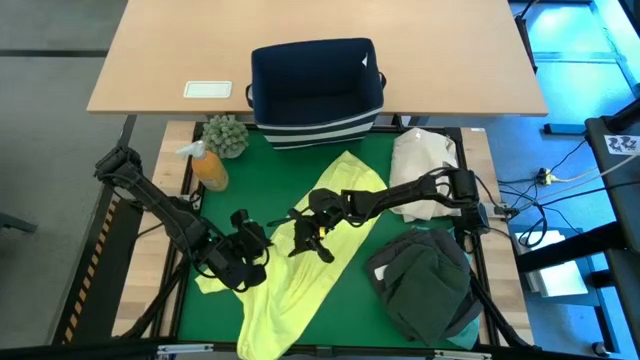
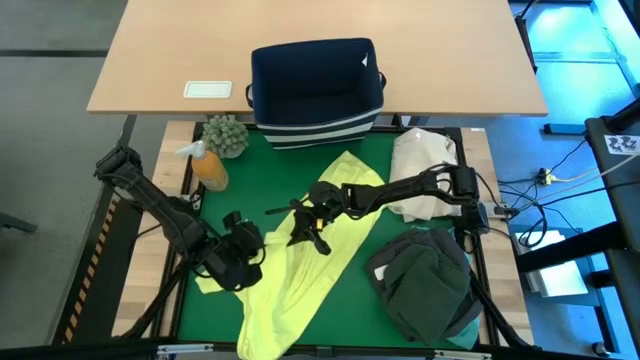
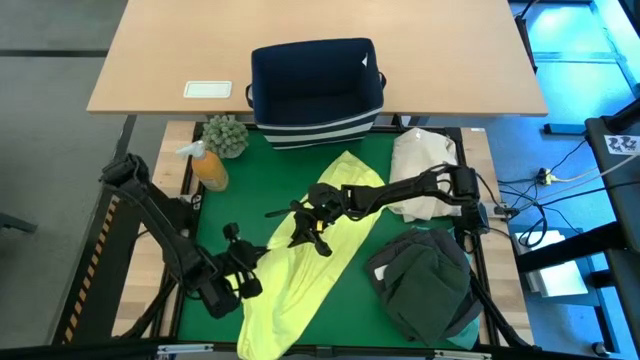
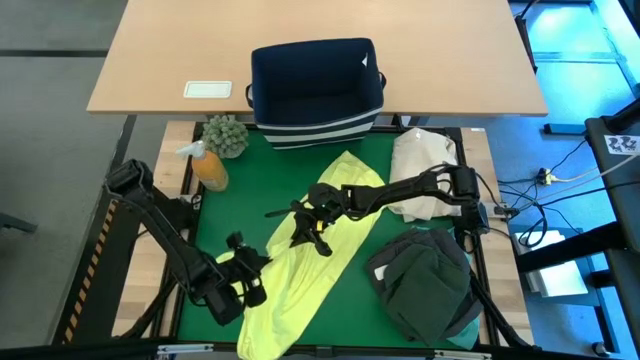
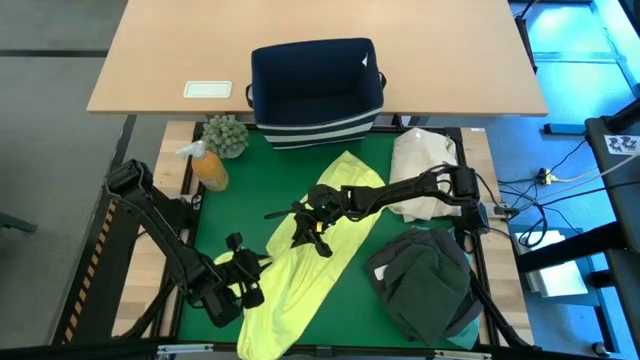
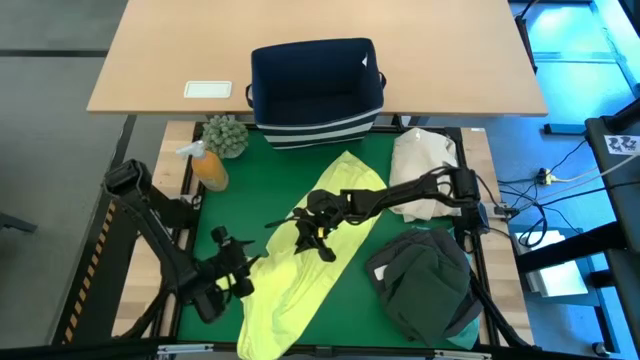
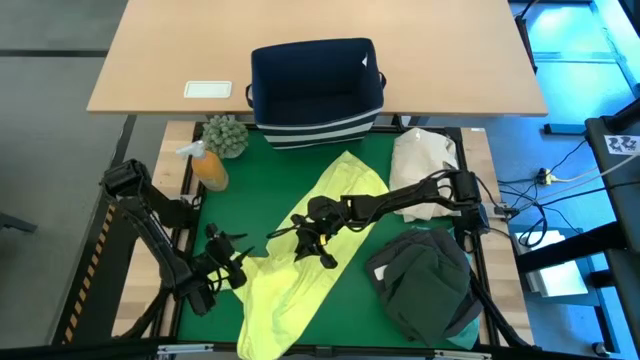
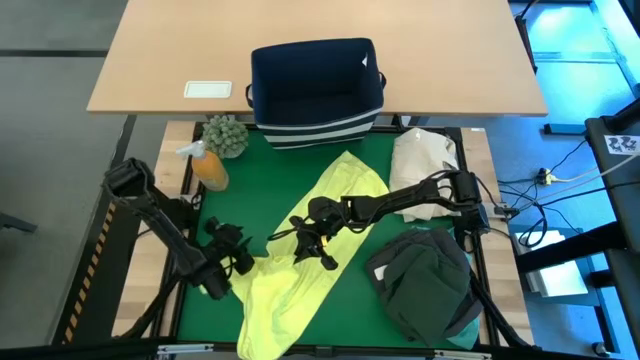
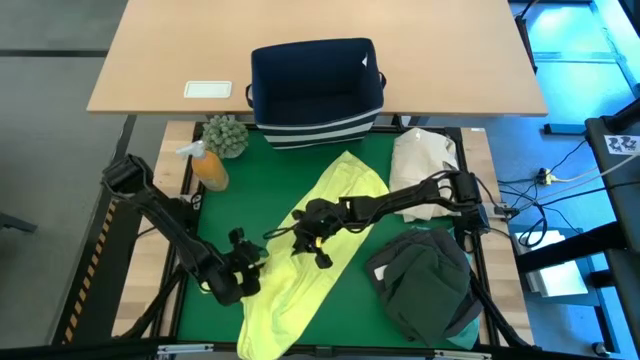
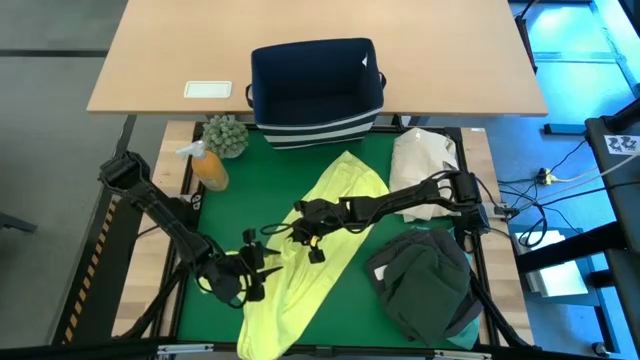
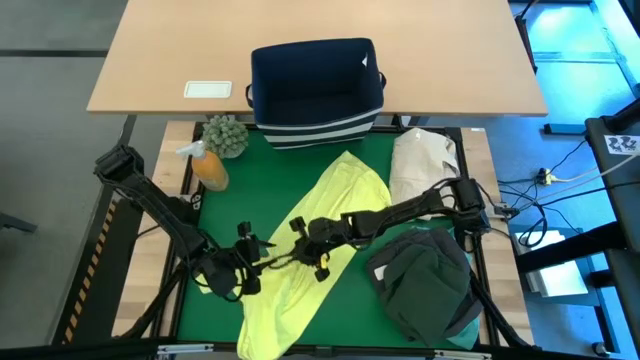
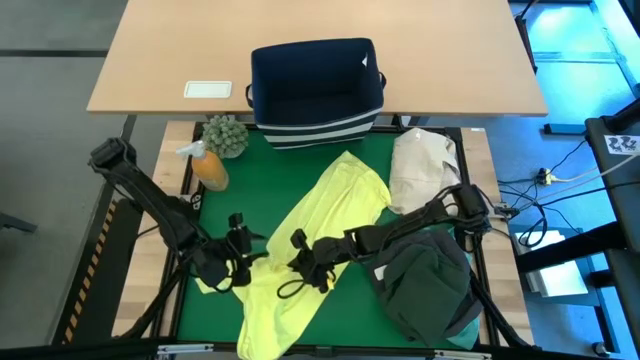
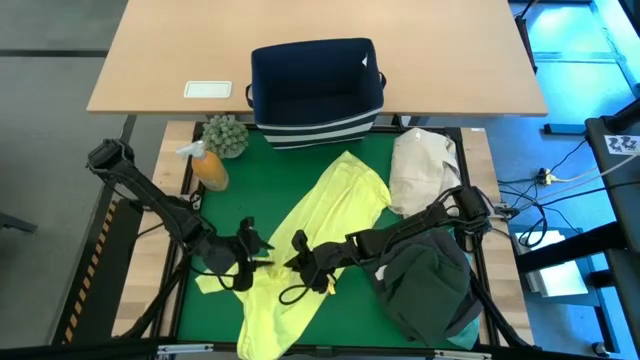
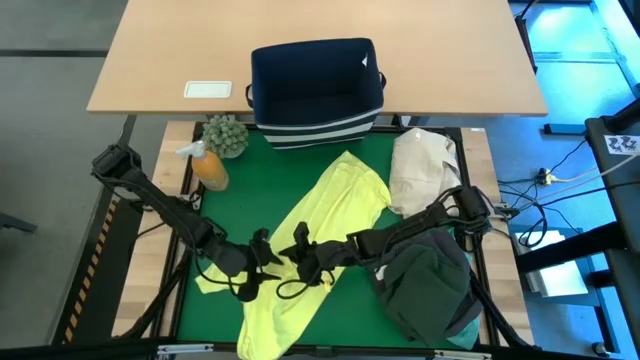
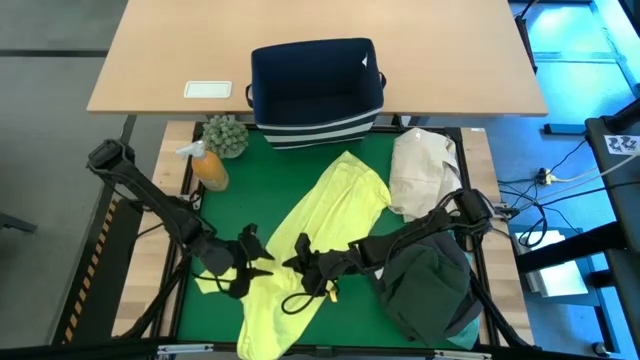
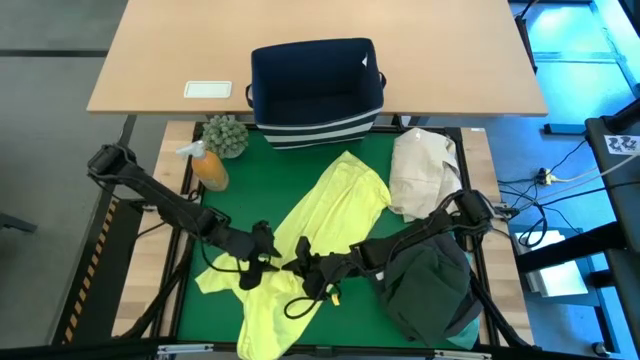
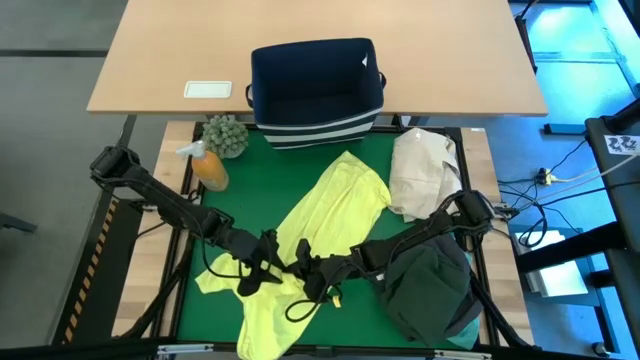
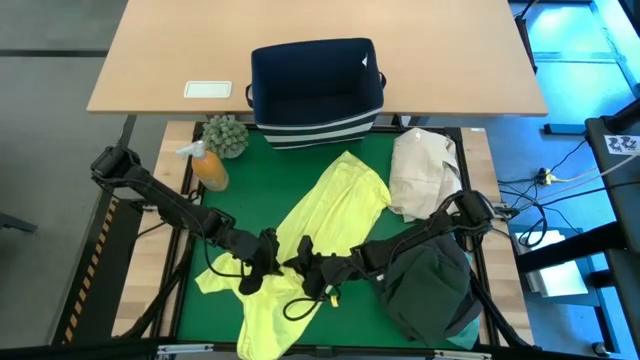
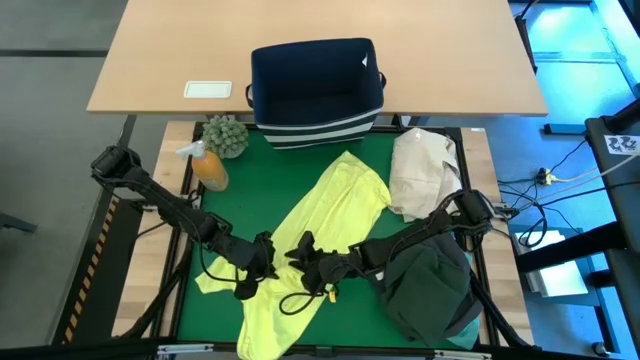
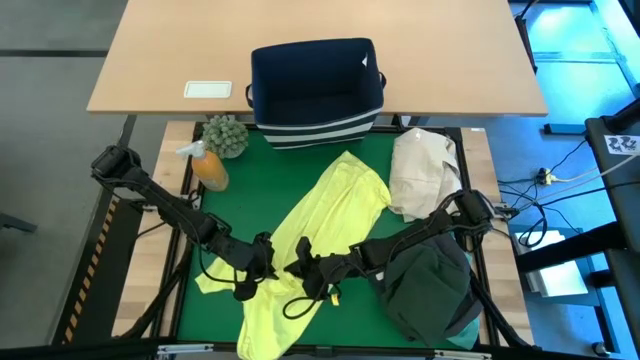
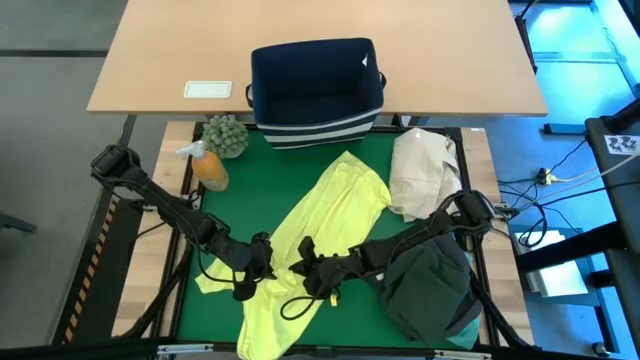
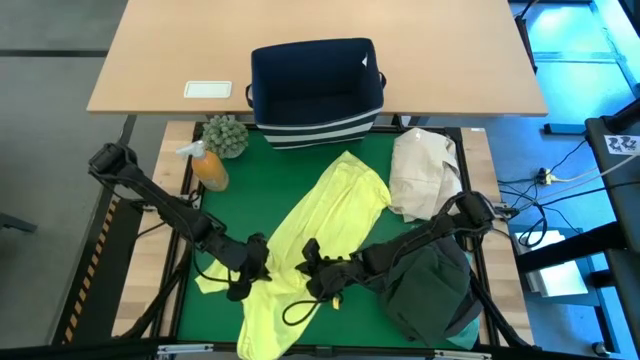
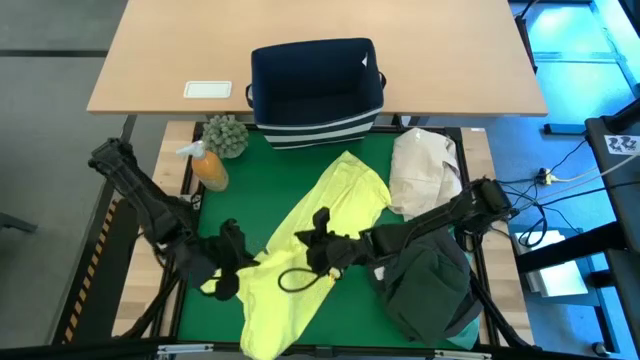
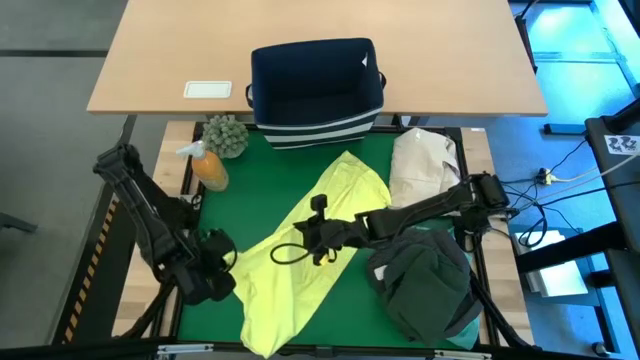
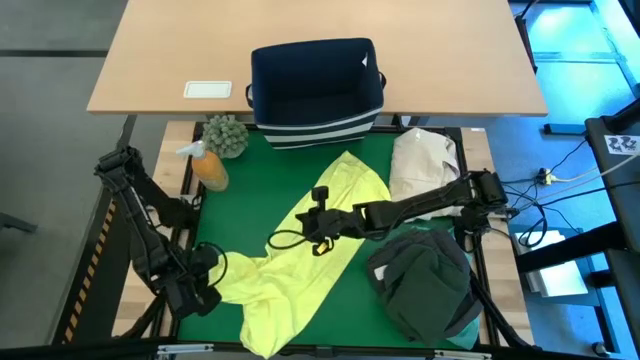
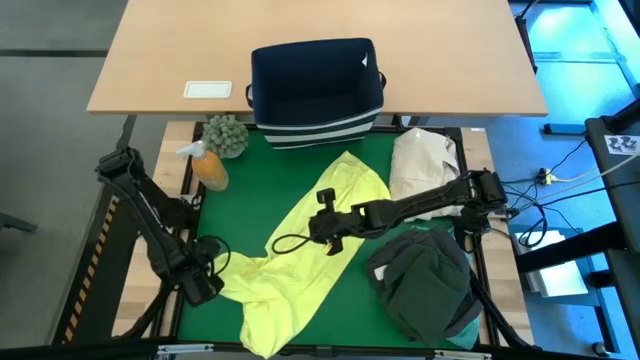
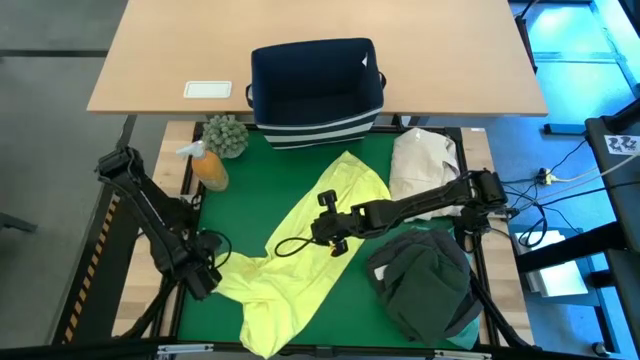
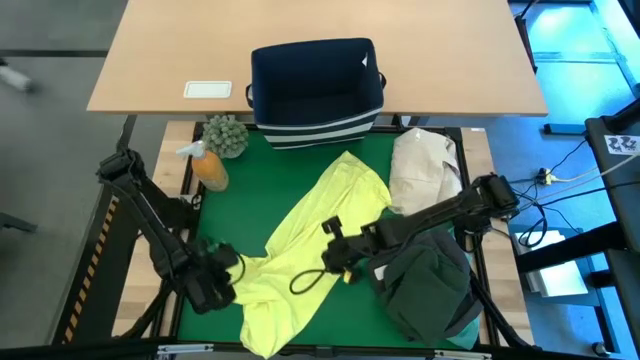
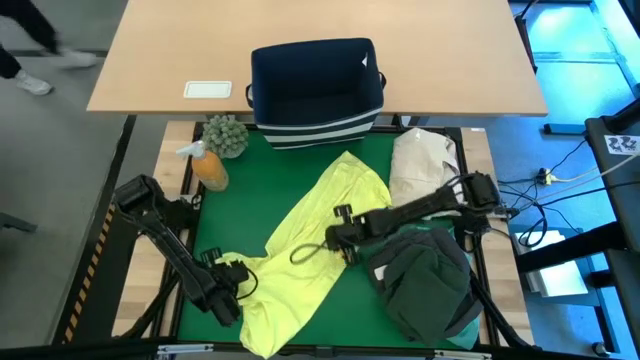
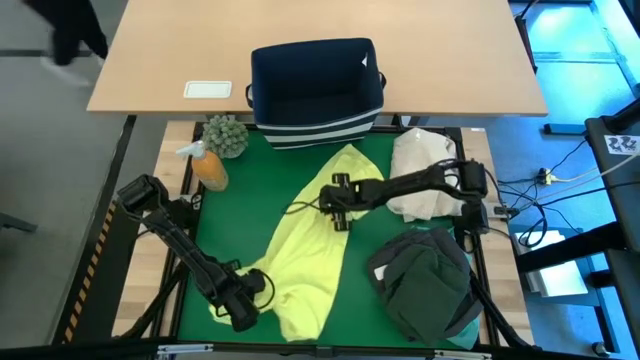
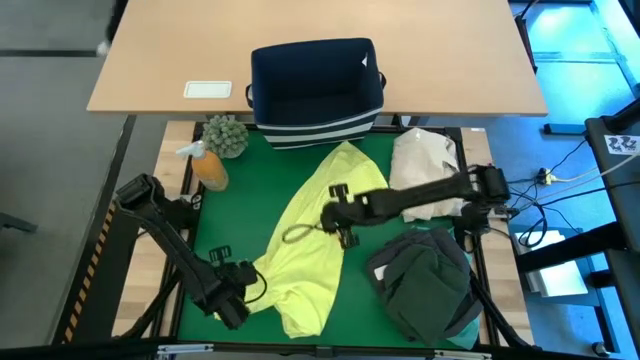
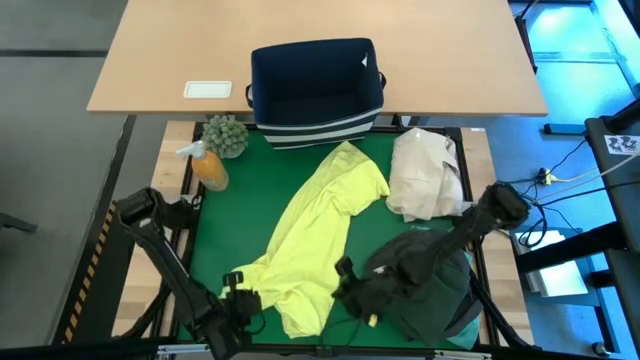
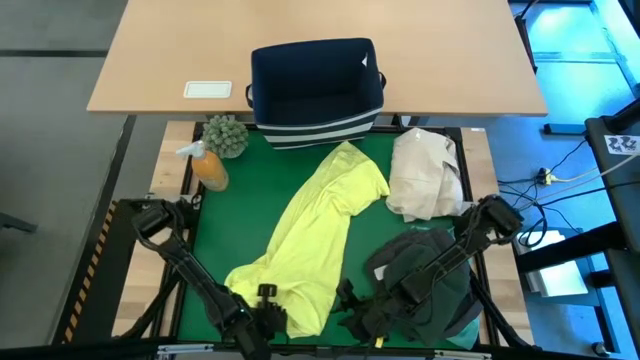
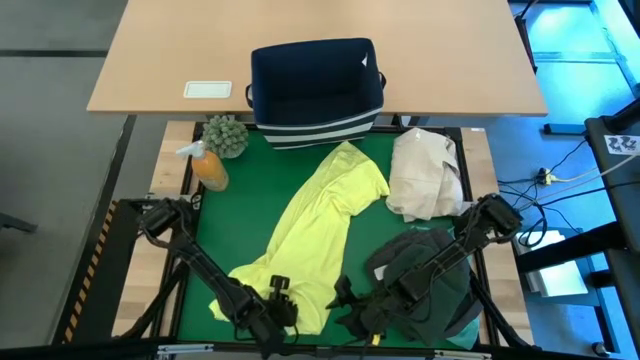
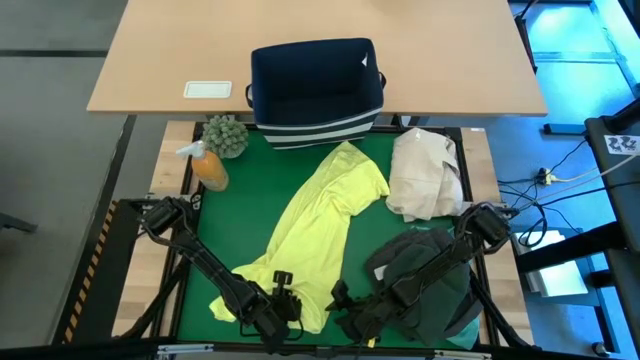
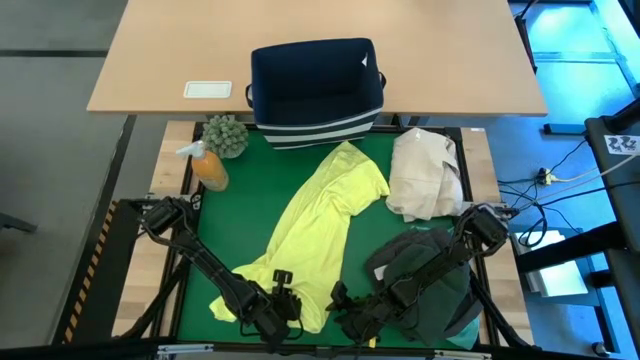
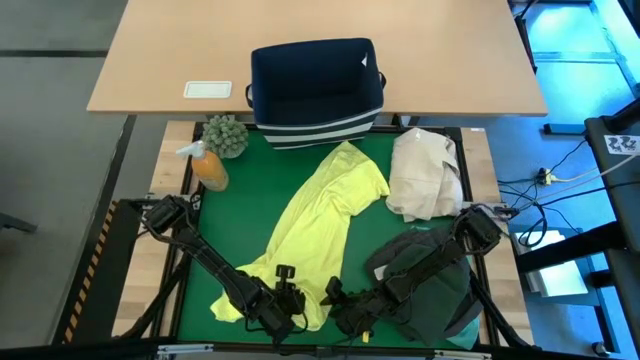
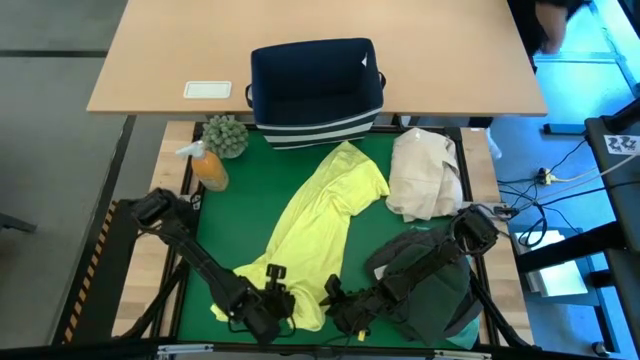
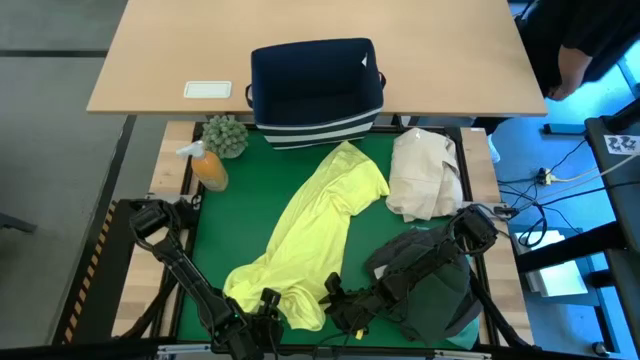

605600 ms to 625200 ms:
Task: Fold laundry
Fold the yellow shirt on the table
